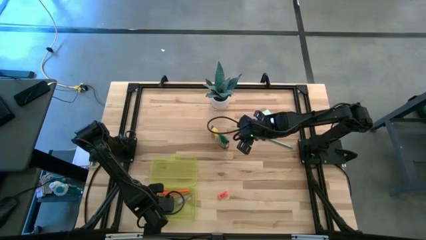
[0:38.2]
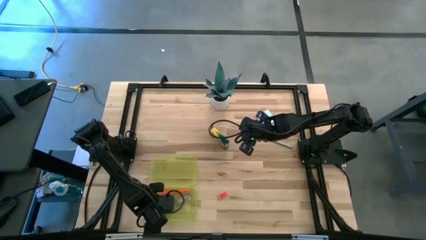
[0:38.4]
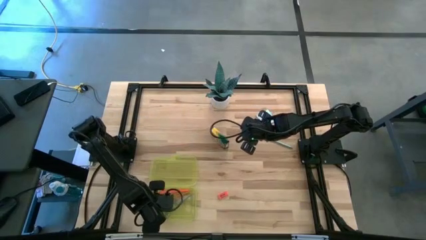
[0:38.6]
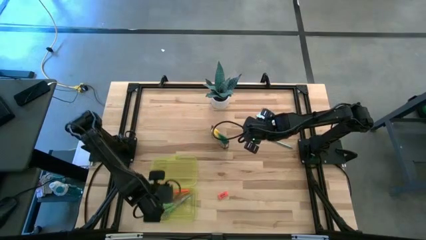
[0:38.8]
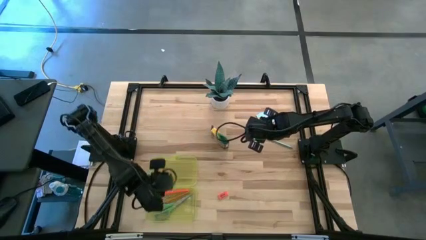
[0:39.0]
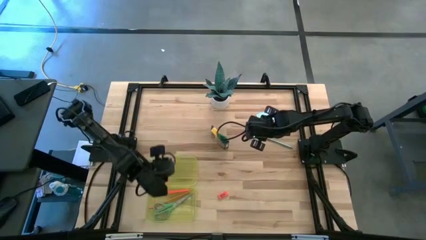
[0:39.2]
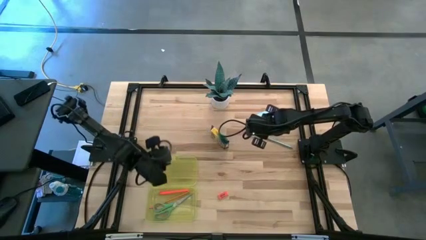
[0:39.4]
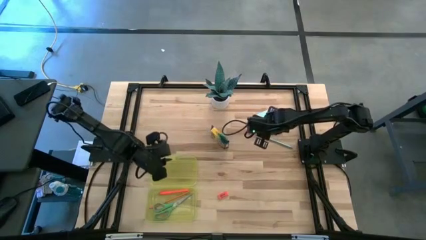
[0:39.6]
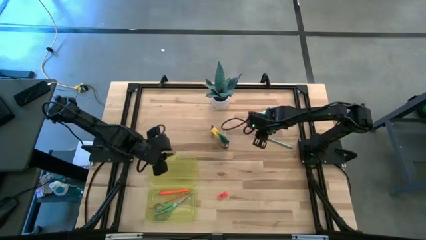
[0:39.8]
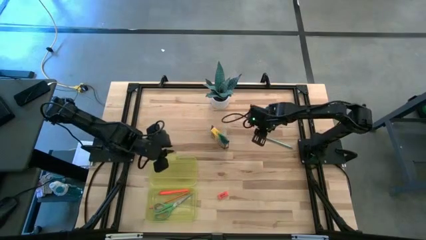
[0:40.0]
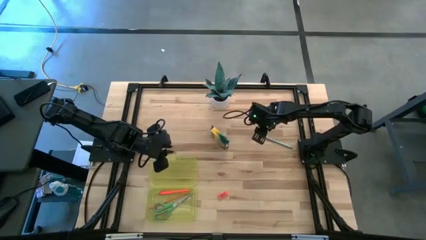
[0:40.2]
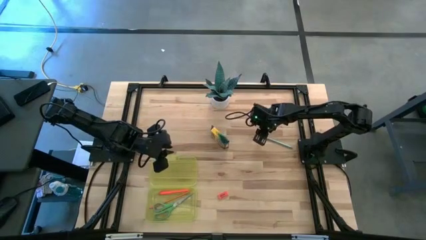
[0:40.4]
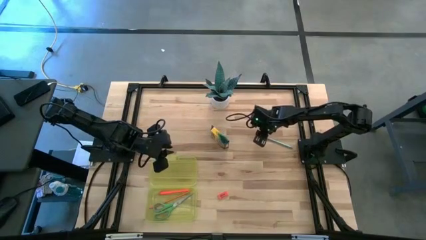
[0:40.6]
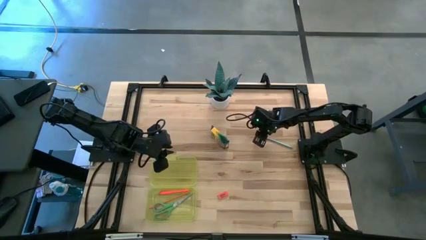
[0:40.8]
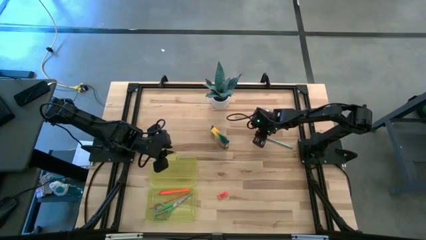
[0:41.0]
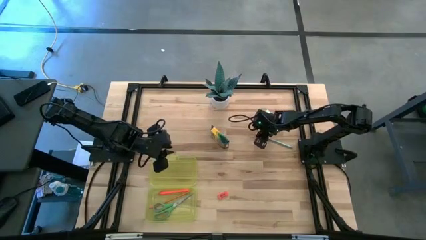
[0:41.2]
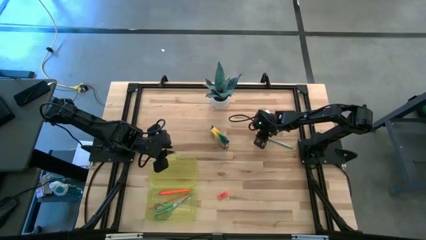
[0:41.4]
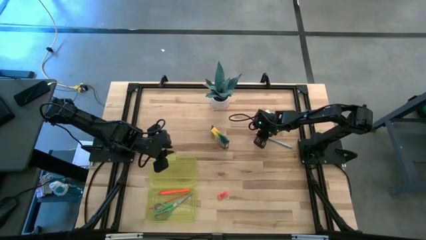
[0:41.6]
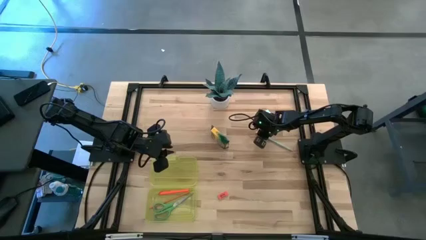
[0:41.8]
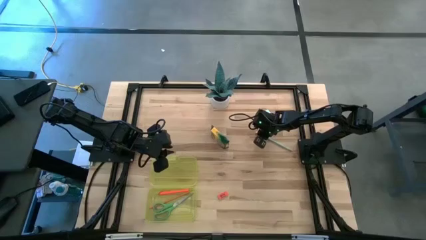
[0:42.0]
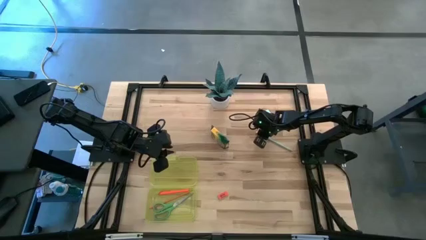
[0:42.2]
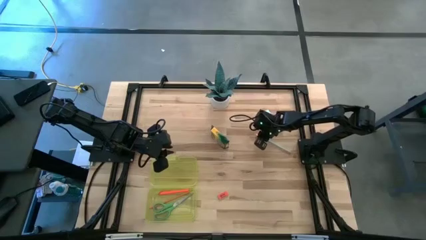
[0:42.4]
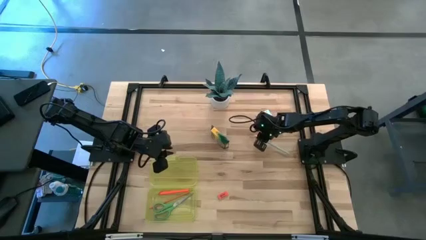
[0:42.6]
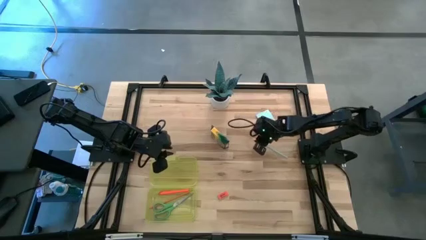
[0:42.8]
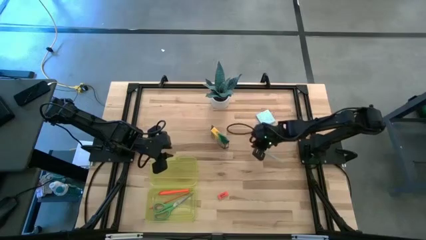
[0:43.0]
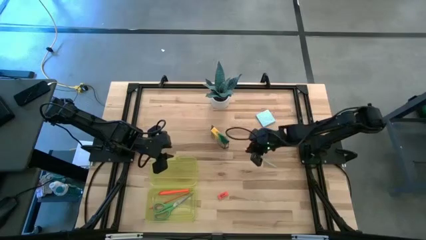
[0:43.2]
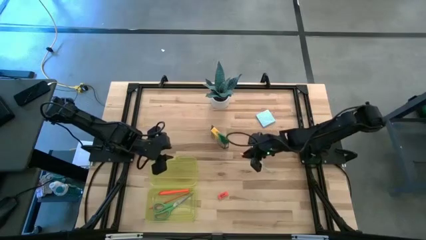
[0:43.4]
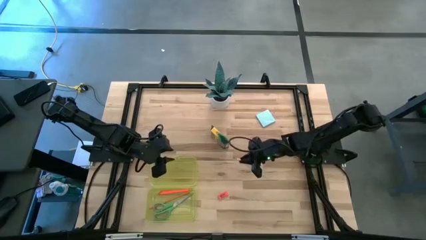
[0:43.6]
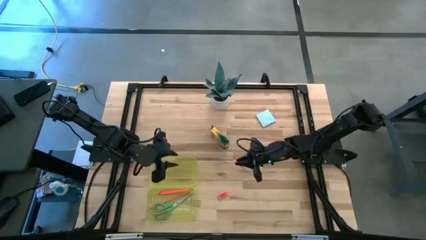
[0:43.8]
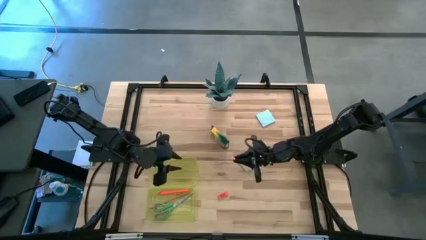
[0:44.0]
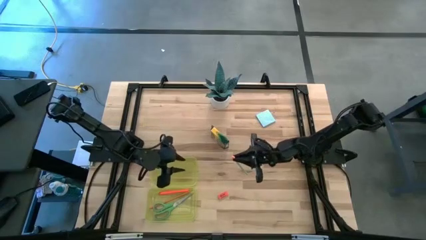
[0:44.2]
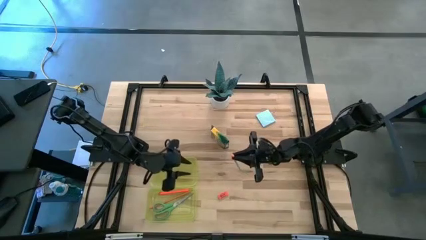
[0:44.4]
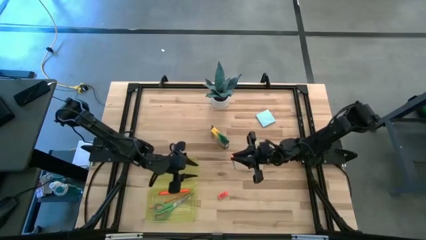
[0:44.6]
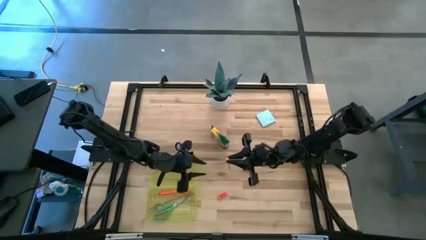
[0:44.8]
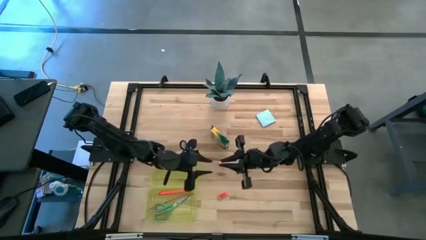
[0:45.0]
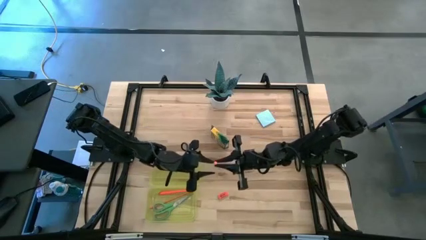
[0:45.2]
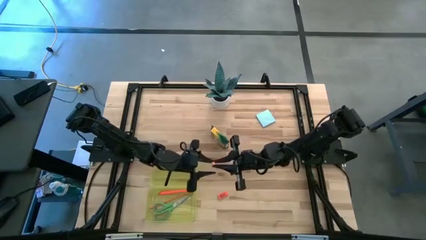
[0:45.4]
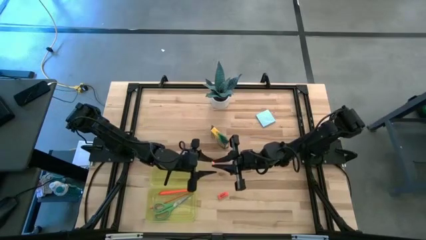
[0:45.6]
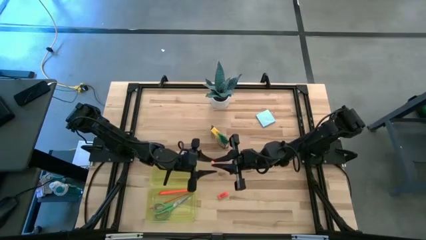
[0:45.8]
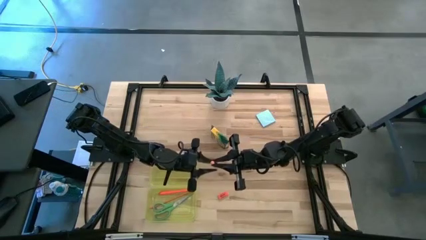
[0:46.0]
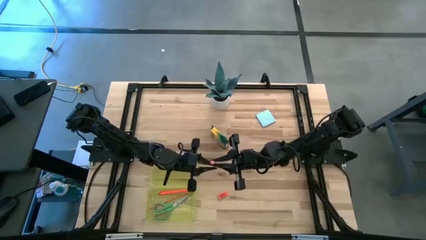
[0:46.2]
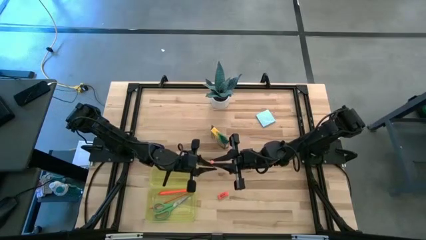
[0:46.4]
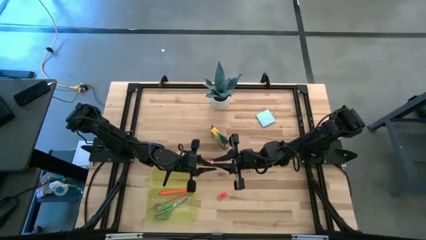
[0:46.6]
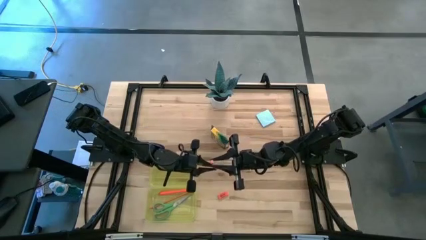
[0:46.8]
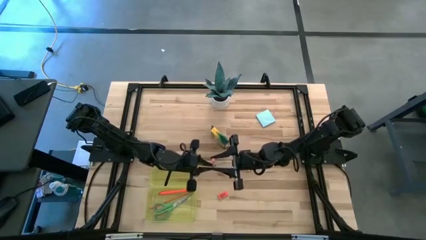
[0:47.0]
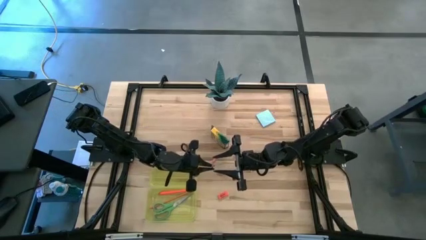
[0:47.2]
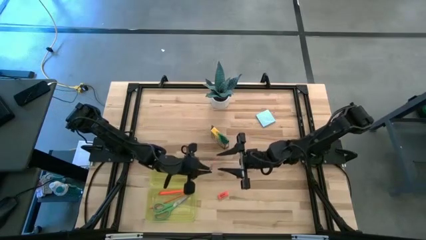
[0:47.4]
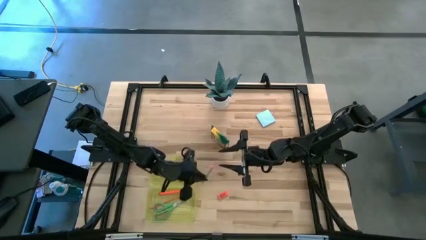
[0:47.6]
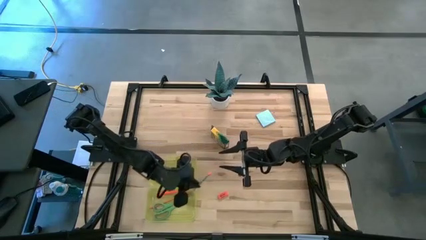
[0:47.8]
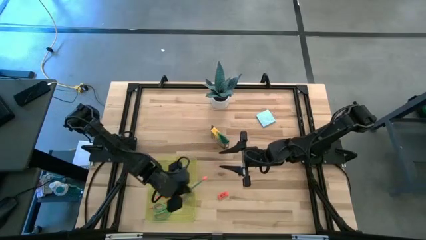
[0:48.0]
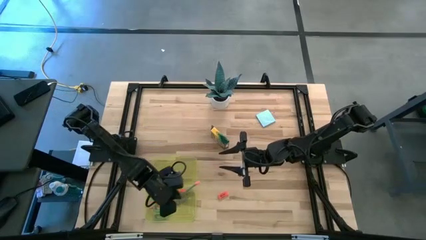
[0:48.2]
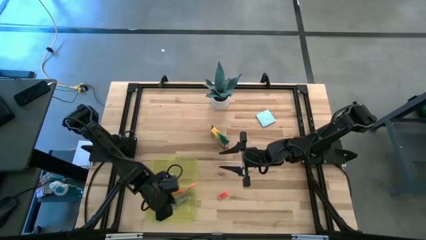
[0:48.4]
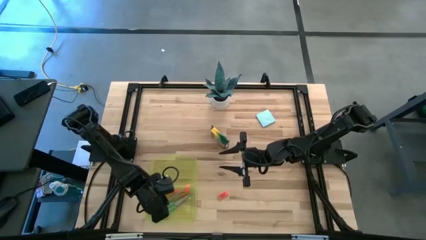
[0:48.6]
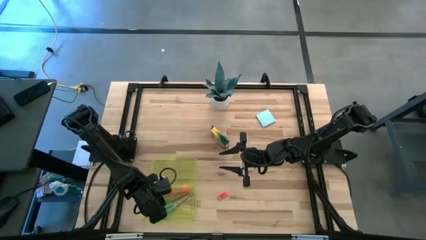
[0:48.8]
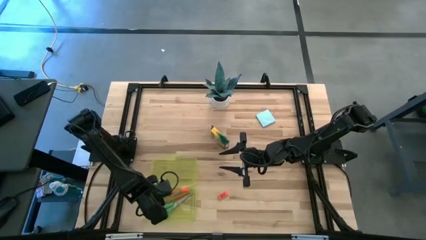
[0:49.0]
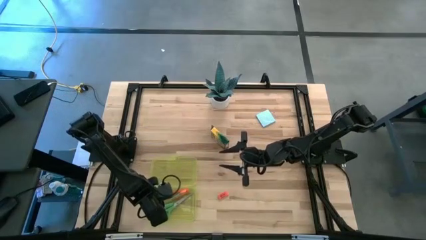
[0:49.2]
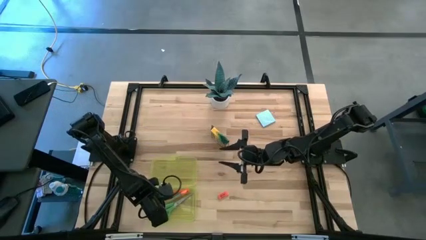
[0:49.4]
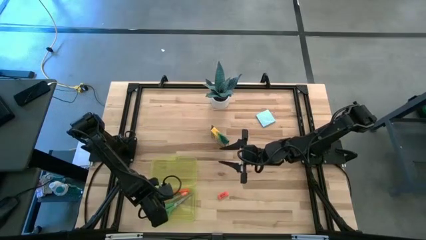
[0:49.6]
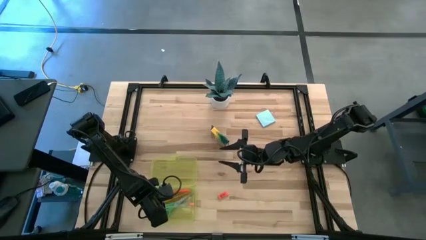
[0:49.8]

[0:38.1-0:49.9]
Task: Pack school essentials
Put the blue pencil into the yellow supply box
